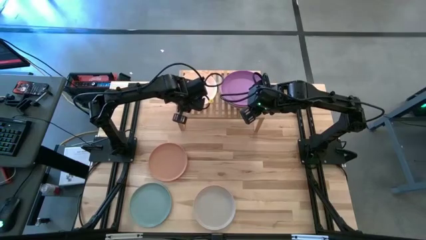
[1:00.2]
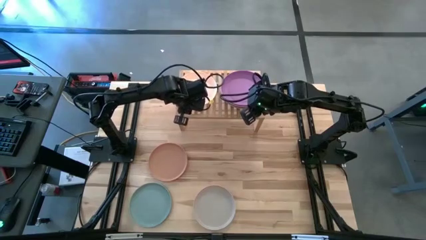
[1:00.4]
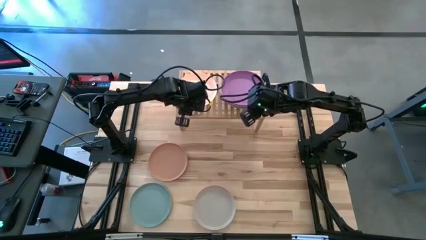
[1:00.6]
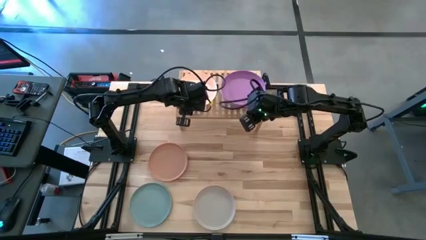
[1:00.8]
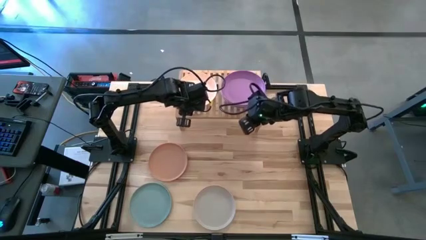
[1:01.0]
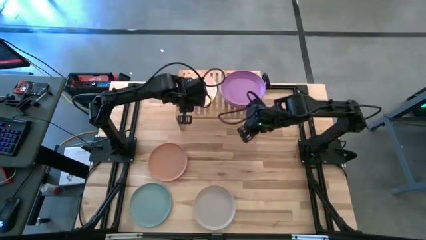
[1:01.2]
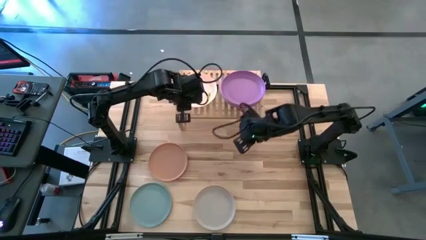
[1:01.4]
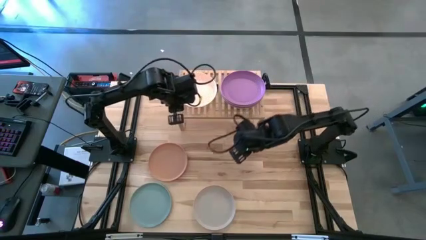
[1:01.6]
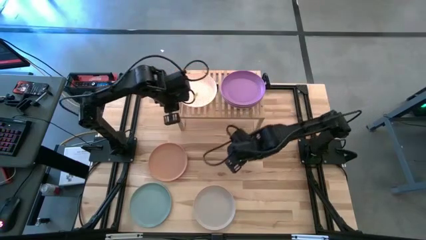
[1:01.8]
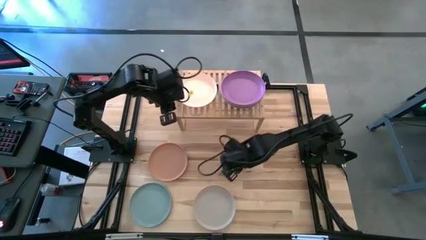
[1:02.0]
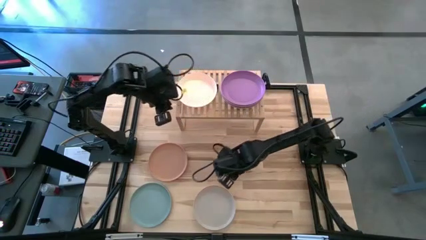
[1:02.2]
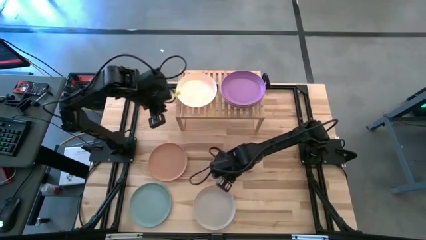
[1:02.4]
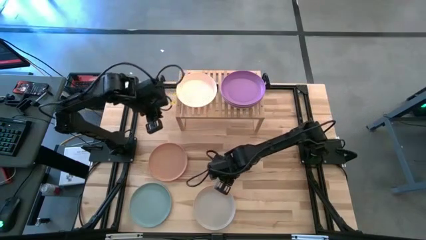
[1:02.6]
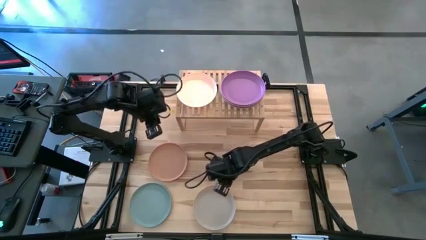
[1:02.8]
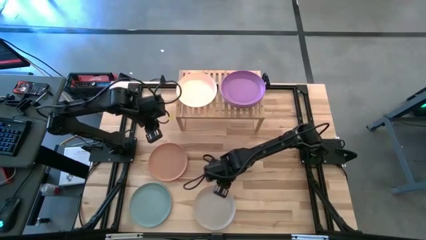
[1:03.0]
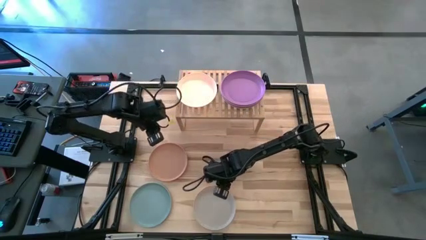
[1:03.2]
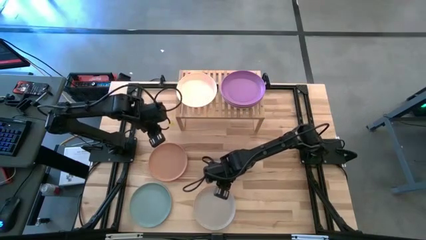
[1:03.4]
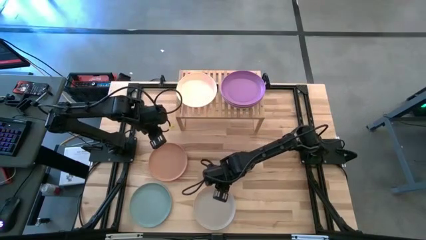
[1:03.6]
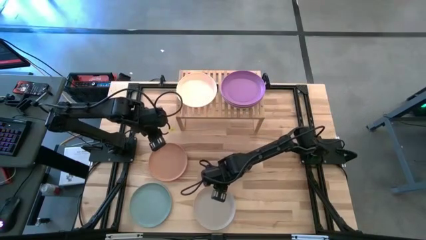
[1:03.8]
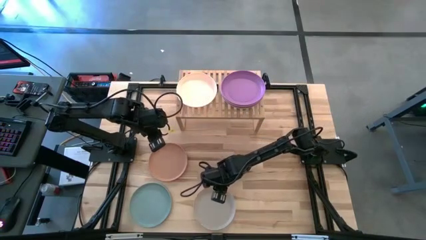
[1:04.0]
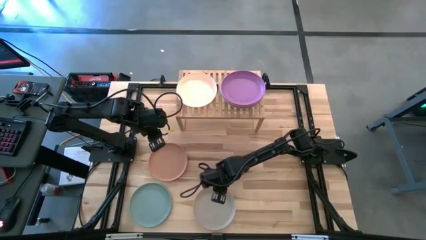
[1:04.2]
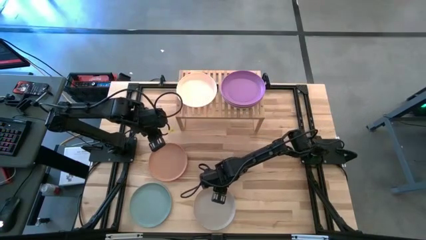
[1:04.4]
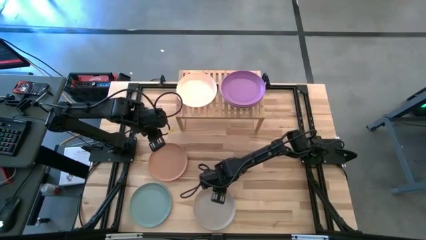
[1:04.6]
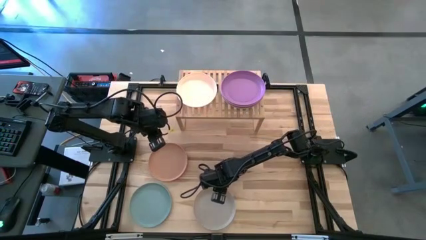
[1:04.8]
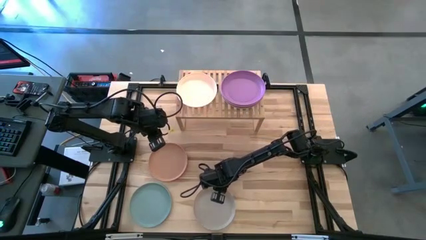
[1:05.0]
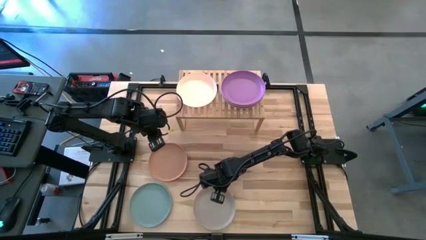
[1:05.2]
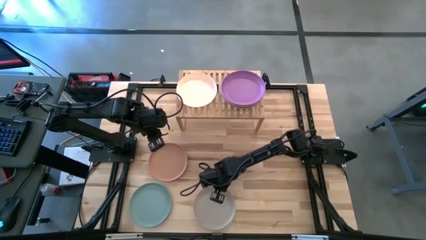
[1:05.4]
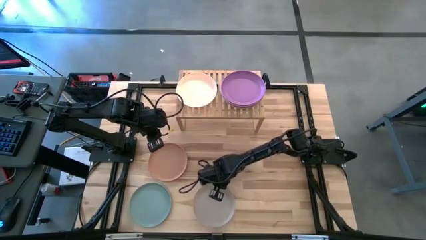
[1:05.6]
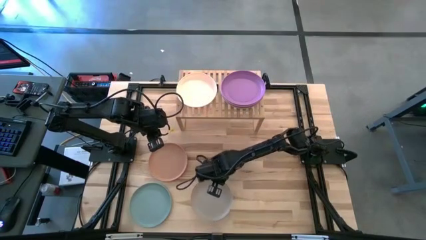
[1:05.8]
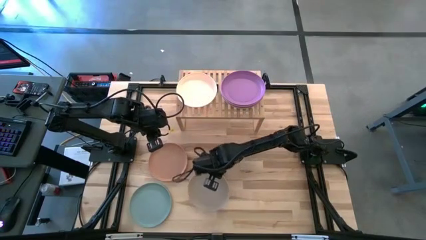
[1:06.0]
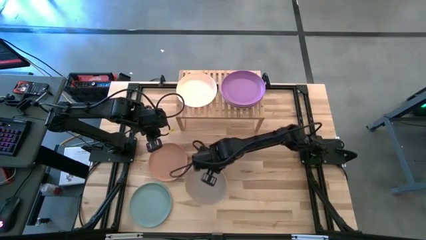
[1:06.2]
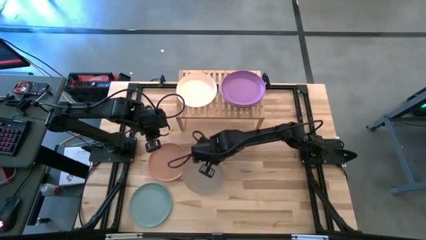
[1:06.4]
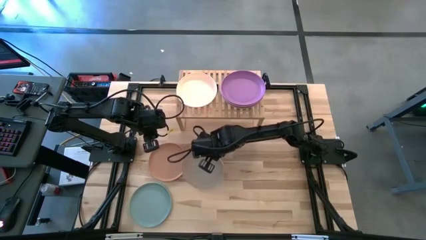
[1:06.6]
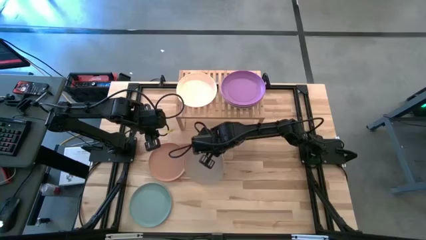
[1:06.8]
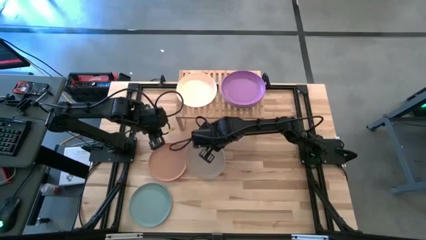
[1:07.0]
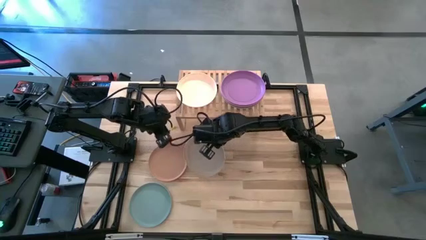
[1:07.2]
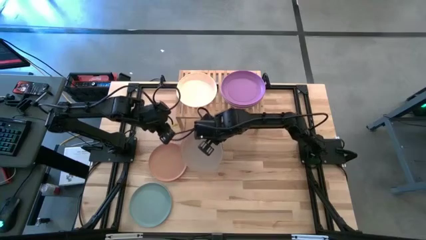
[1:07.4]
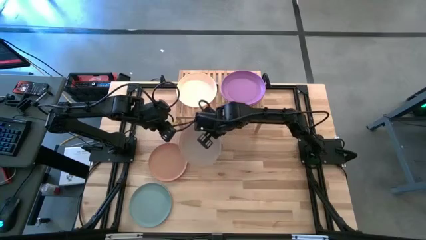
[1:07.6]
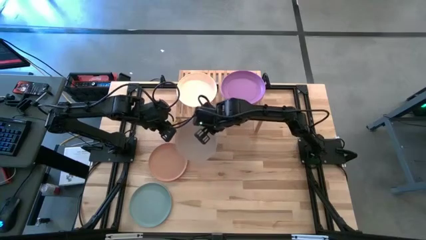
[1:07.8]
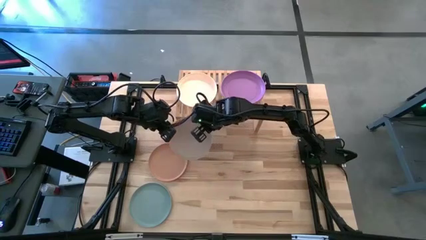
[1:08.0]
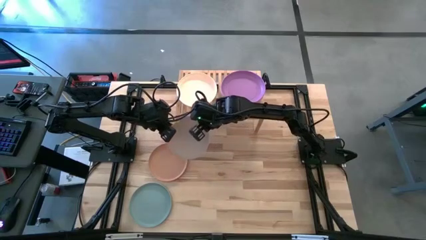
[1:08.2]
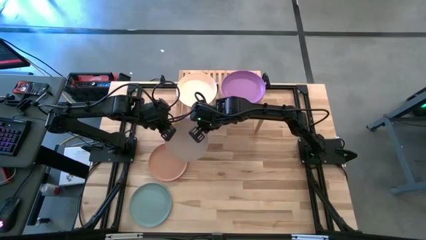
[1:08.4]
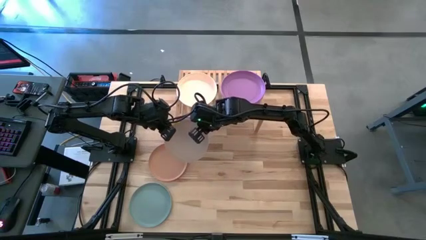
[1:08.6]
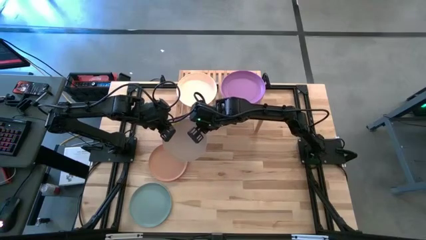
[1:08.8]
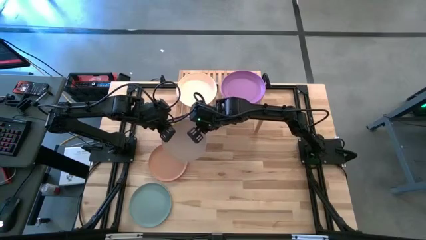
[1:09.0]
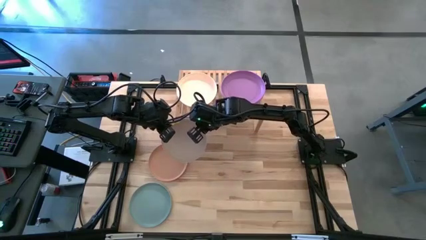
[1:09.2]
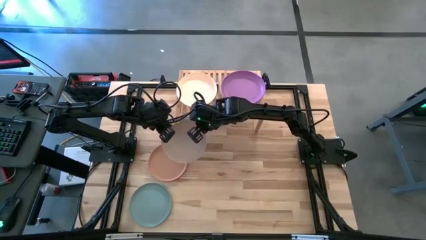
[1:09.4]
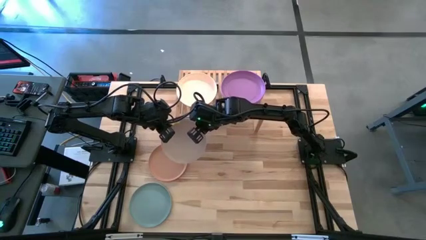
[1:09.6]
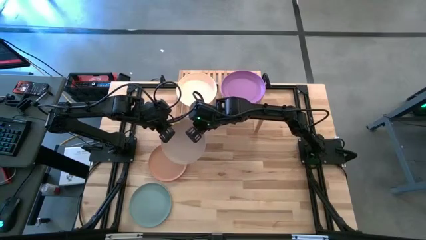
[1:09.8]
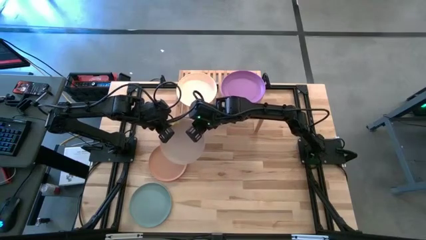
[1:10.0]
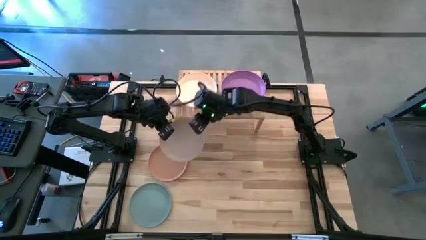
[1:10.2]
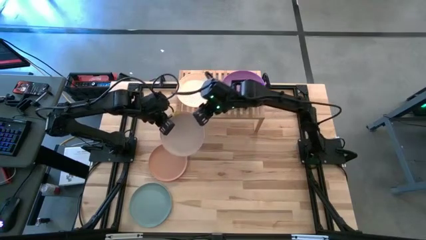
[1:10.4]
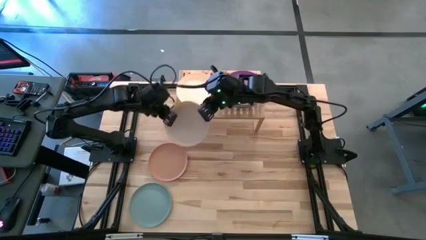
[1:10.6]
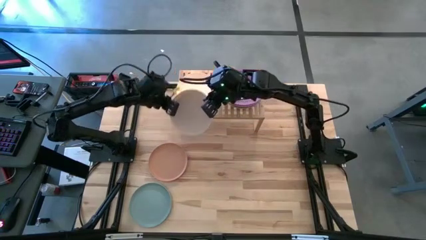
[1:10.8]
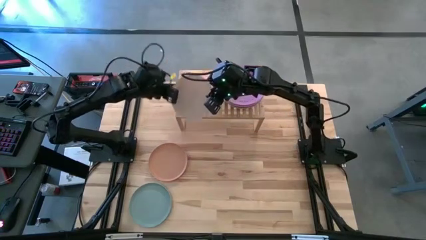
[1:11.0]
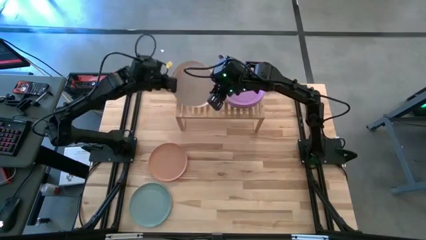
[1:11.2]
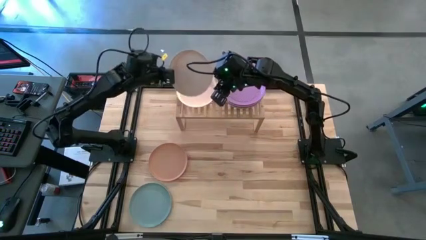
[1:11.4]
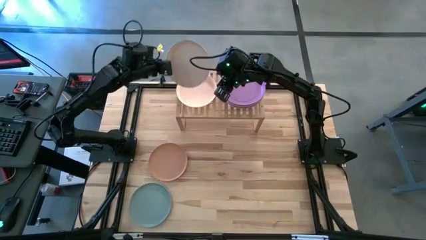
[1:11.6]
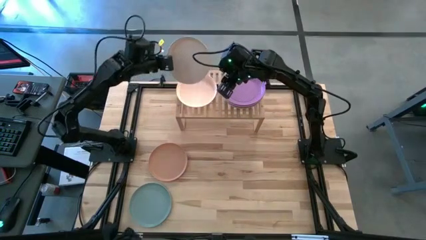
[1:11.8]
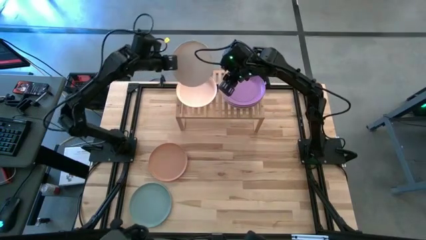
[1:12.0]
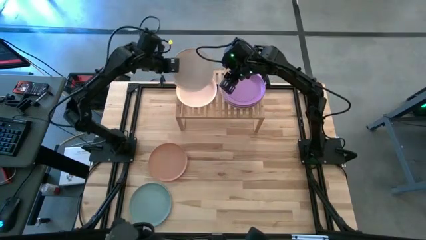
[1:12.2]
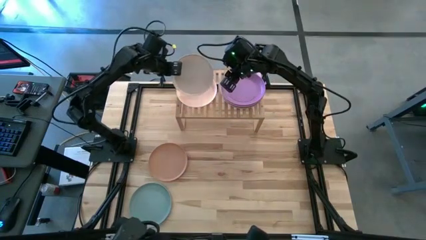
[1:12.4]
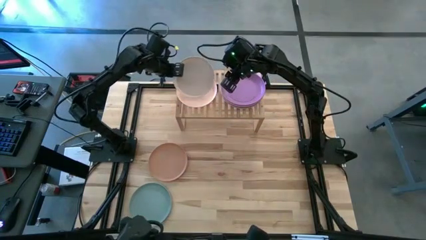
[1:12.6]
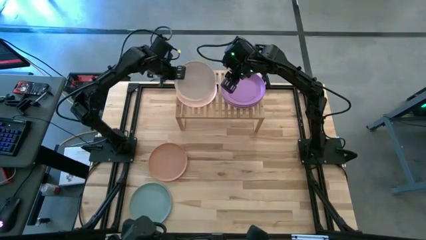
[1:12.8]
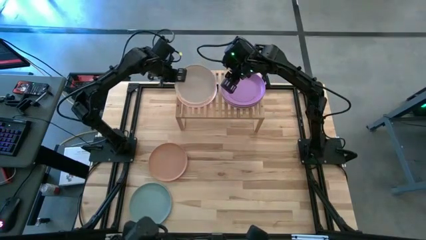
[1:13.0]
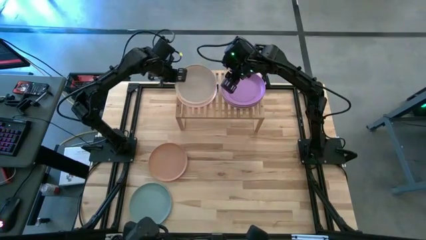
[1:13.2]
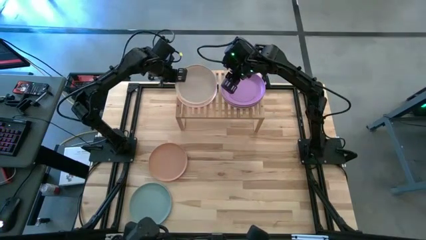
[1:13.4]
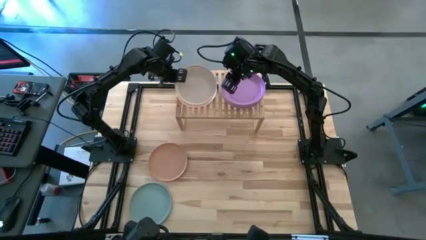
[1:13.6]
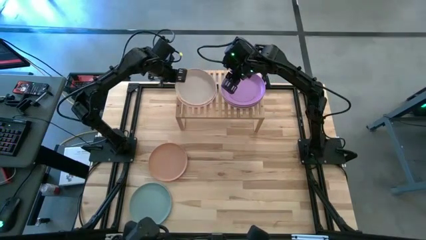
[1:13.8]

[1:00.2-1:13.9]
Task: Place and stack plates onto a shelf
Stack the gray plate on top of the white plate on the shelf

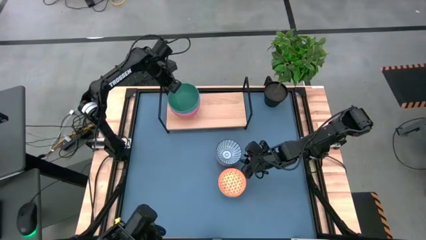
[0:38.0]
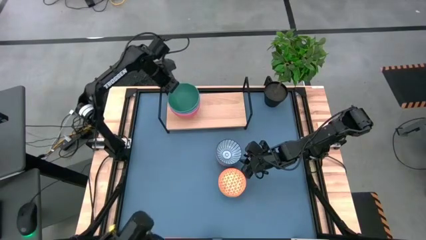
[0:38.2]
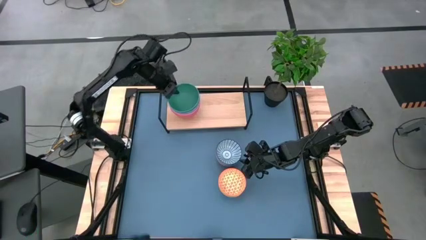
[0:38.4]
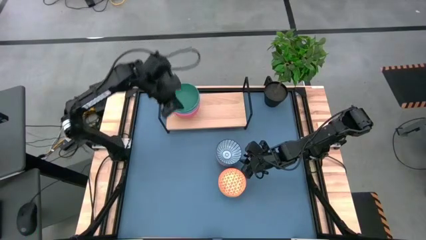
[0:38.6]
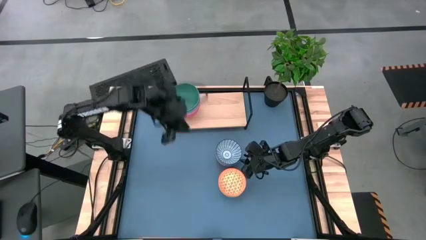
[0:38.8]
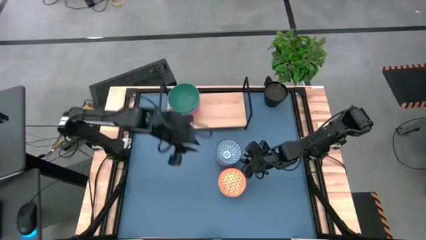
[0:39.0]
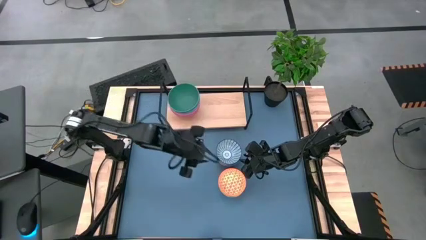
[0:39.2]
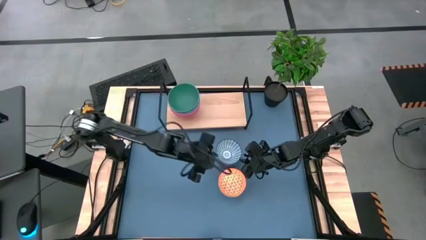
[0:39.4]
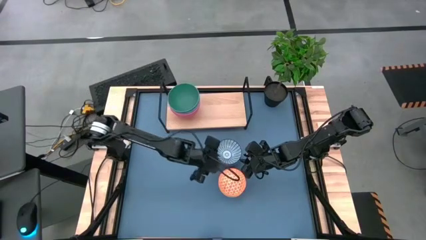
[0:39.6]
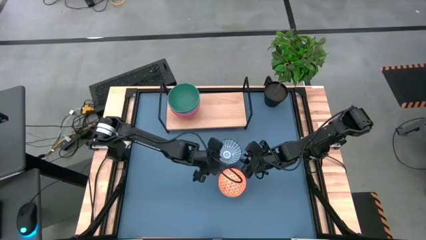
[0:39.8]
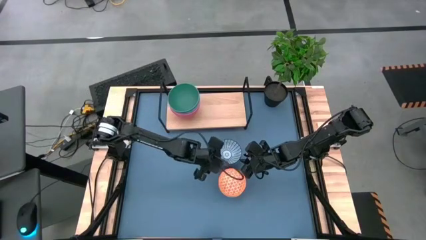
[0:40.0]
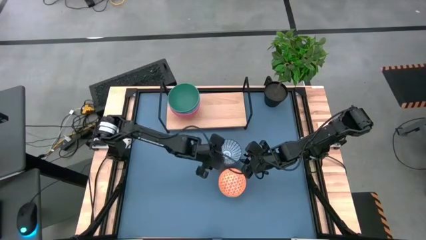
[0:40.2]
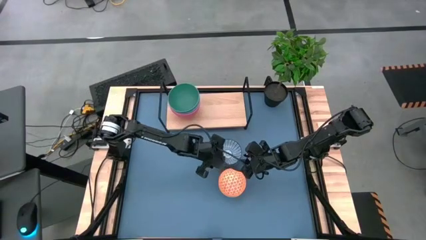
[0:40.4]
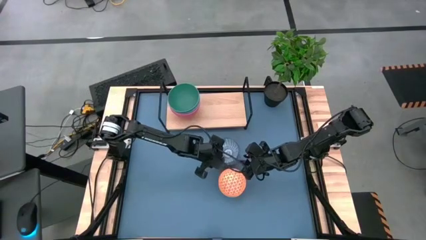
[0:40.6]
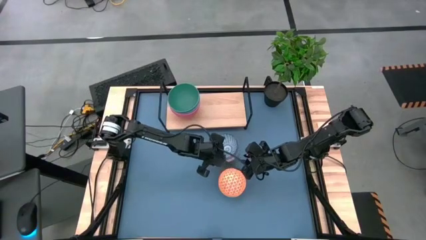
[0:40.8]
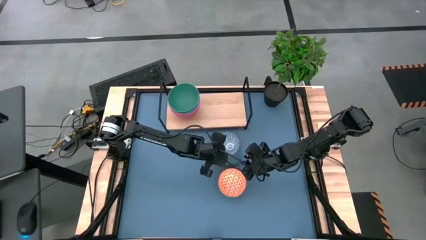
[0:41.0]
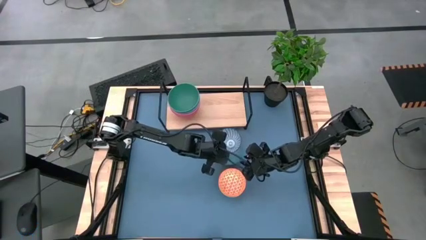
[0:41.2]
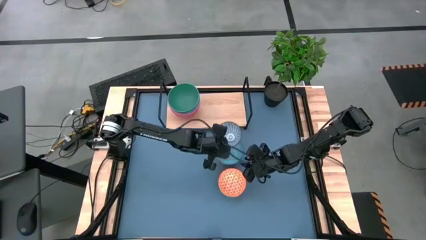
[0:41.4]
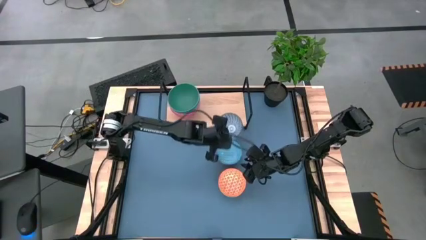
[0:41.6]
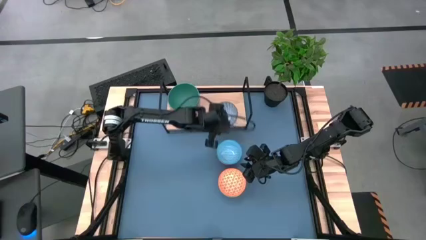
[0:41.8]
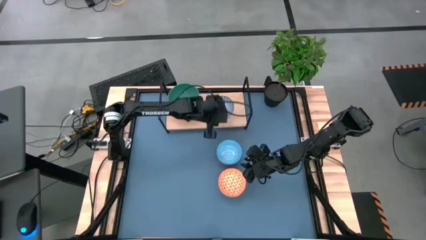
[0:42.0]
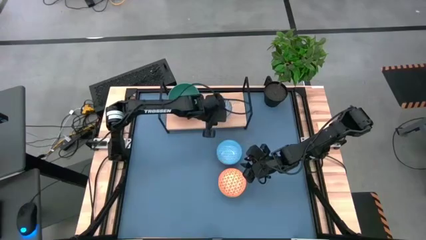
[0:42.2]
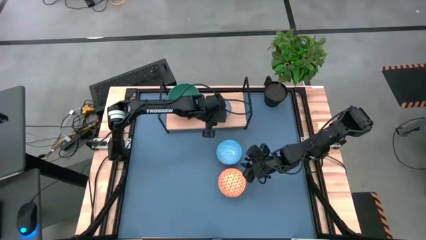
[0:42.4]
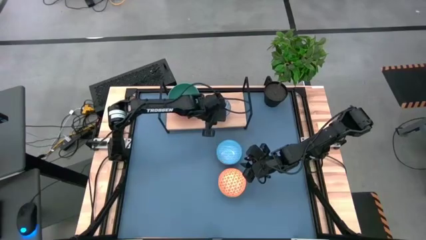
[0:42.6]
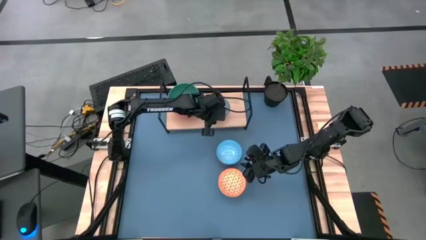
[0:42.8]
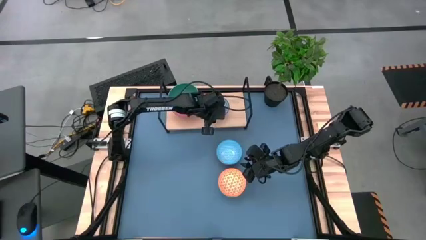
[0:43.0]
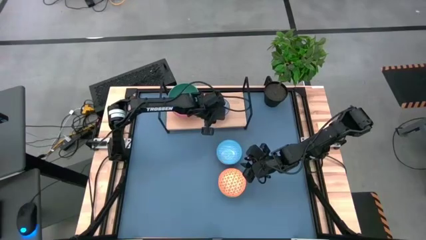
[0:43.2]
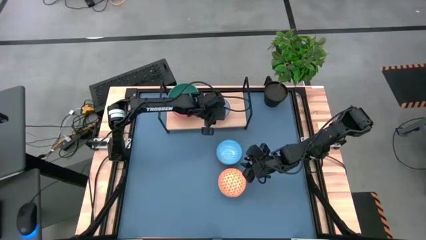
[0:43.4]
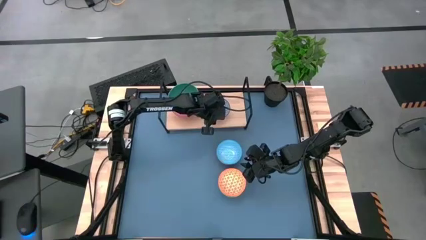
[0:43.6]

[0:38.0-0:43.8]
Task: Place and stack bowls onto a shelf
Put the dark blue patterned bowl on the shelf
